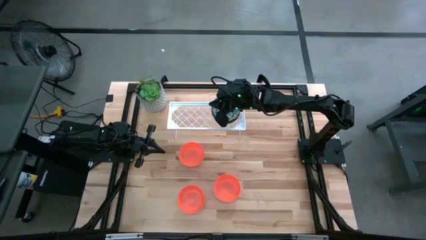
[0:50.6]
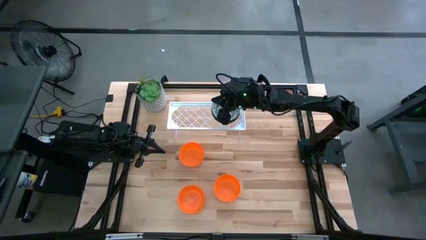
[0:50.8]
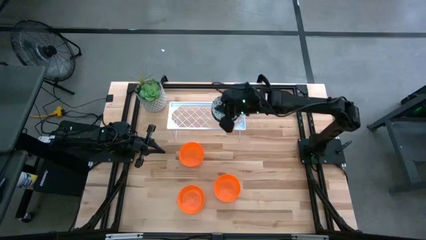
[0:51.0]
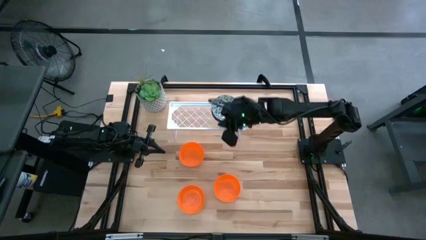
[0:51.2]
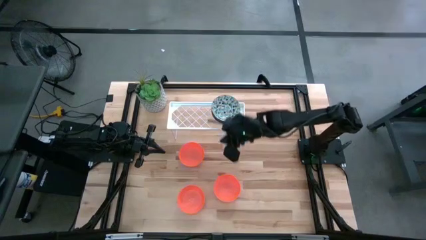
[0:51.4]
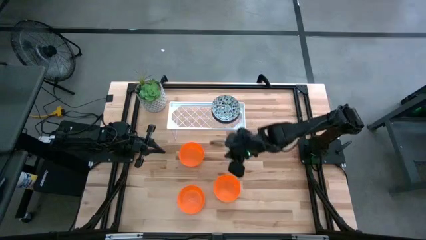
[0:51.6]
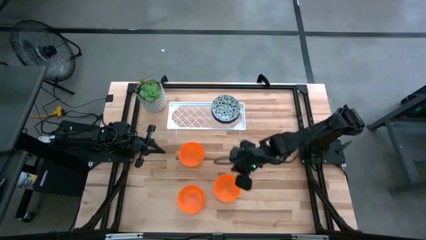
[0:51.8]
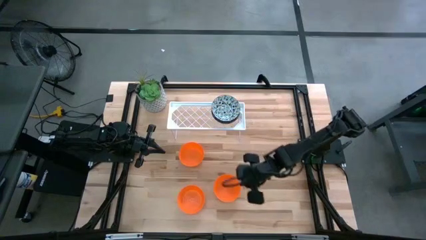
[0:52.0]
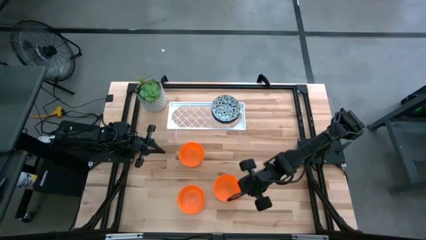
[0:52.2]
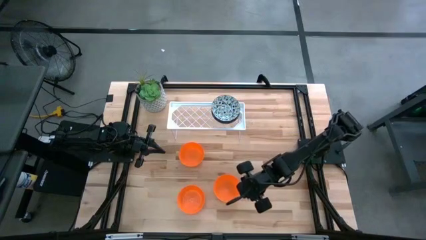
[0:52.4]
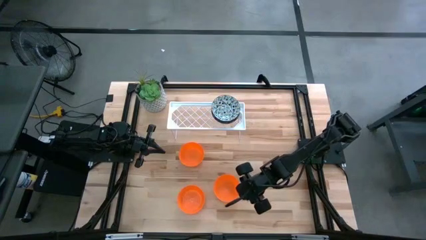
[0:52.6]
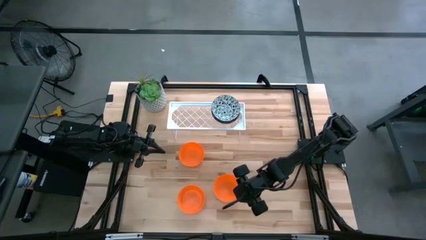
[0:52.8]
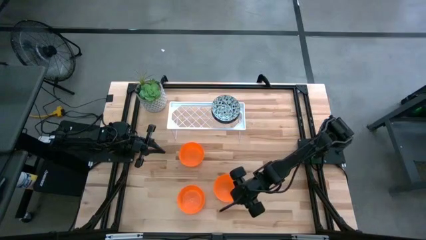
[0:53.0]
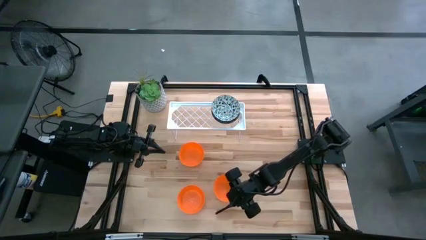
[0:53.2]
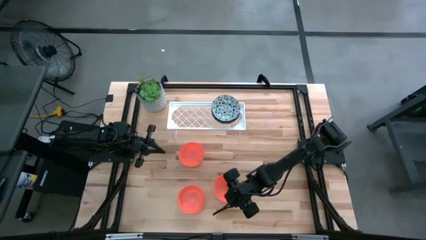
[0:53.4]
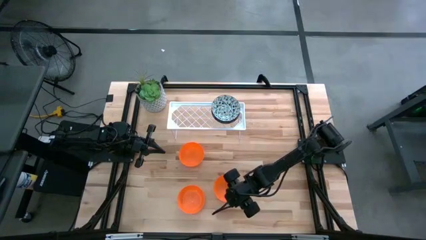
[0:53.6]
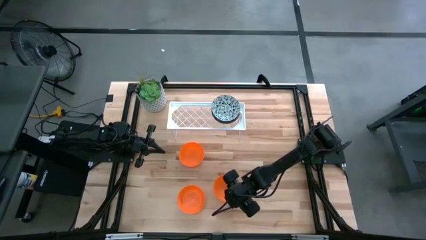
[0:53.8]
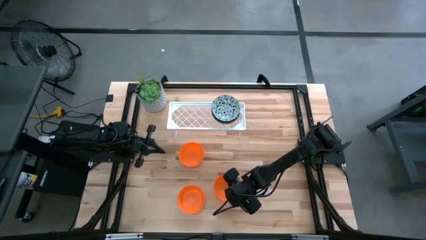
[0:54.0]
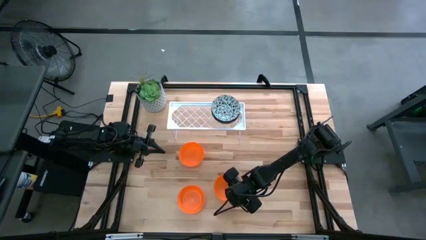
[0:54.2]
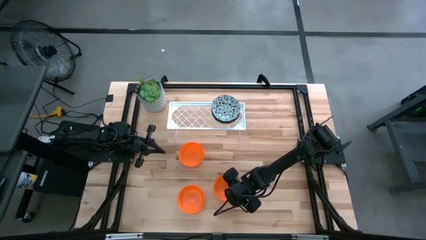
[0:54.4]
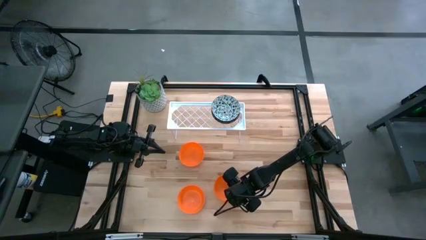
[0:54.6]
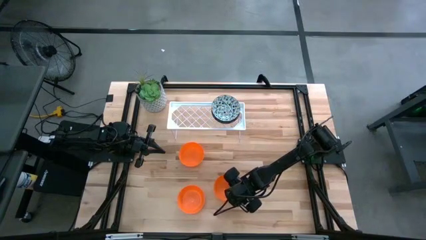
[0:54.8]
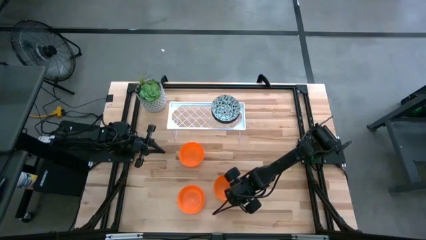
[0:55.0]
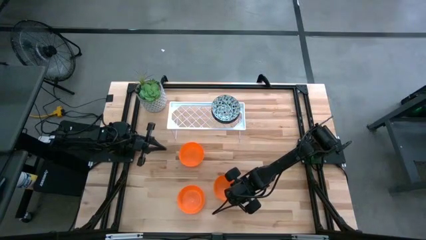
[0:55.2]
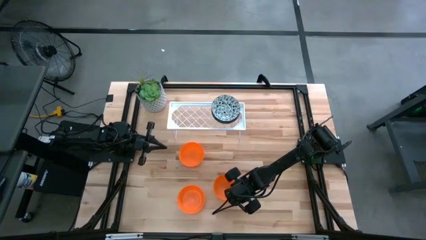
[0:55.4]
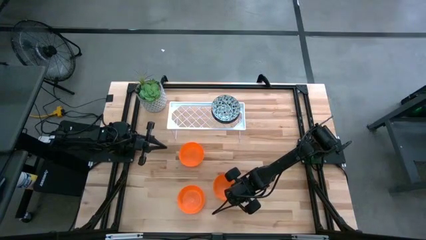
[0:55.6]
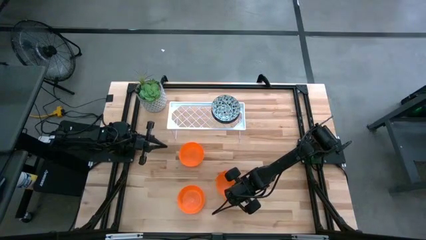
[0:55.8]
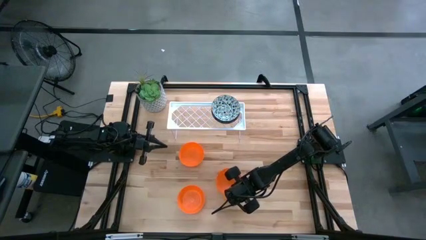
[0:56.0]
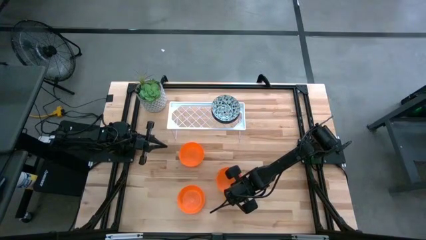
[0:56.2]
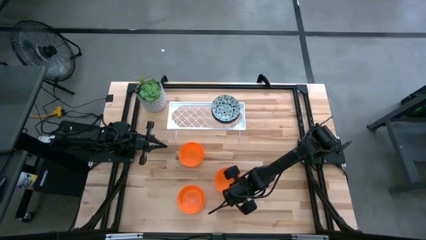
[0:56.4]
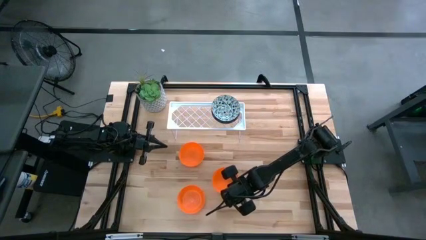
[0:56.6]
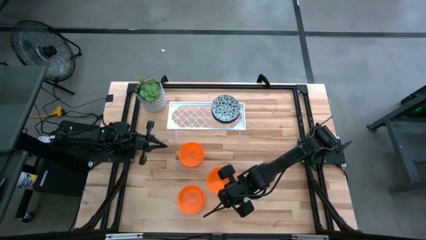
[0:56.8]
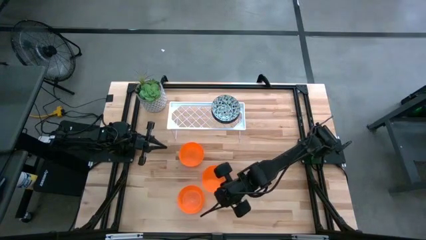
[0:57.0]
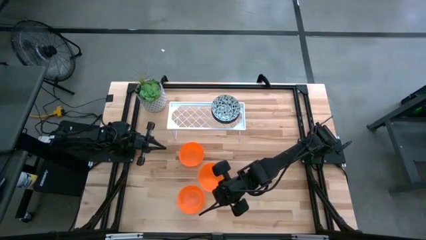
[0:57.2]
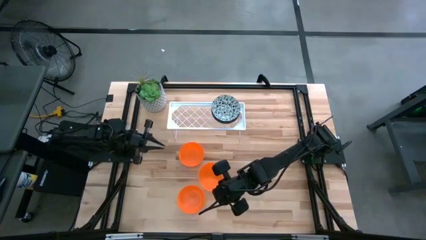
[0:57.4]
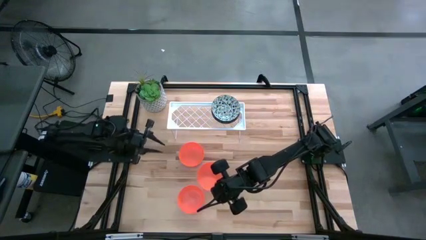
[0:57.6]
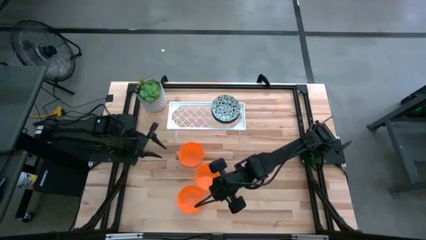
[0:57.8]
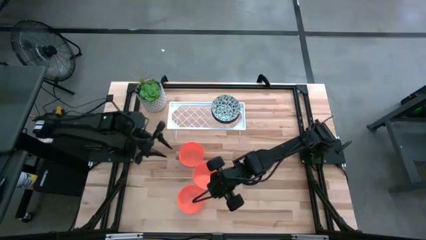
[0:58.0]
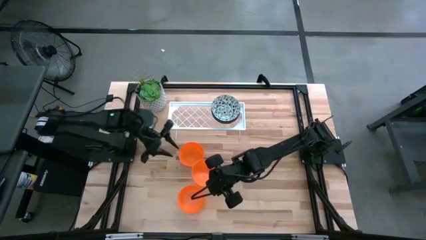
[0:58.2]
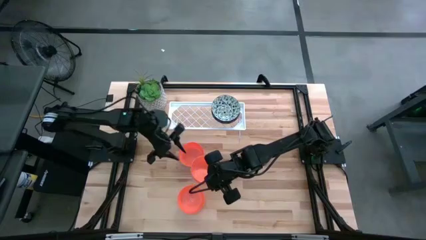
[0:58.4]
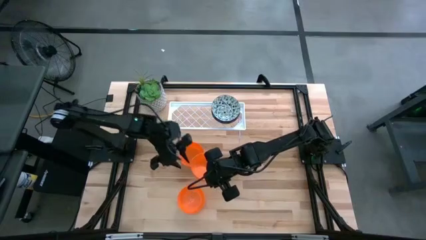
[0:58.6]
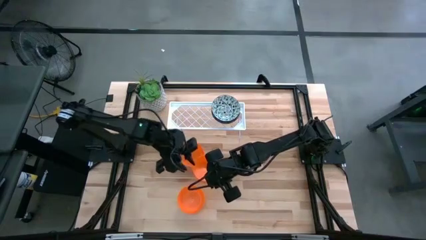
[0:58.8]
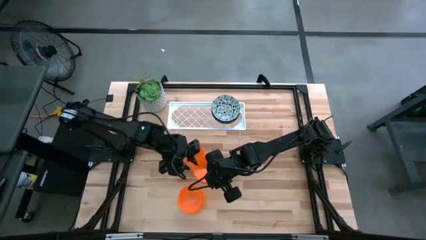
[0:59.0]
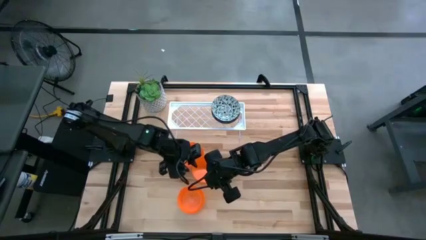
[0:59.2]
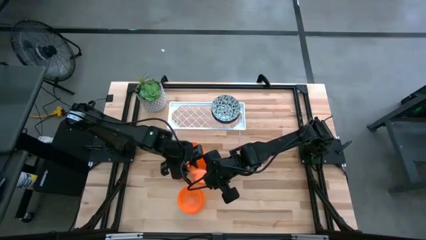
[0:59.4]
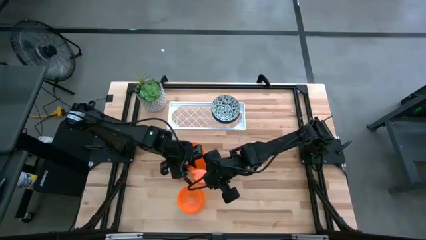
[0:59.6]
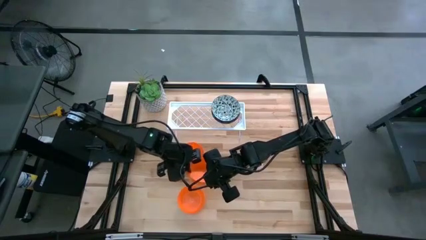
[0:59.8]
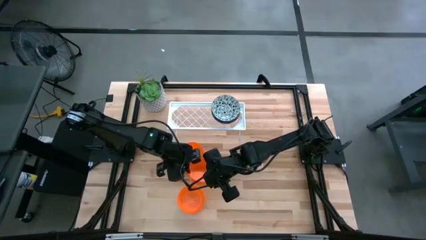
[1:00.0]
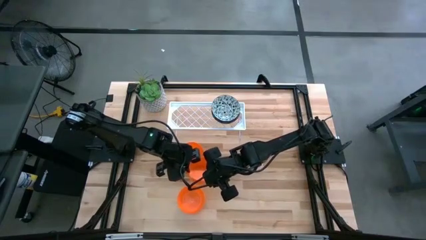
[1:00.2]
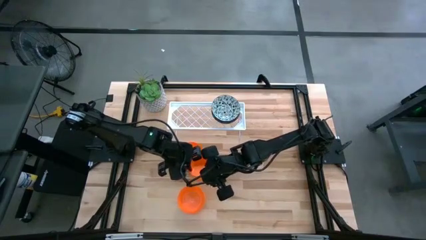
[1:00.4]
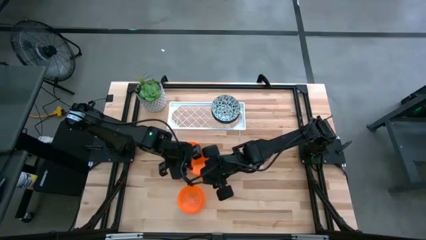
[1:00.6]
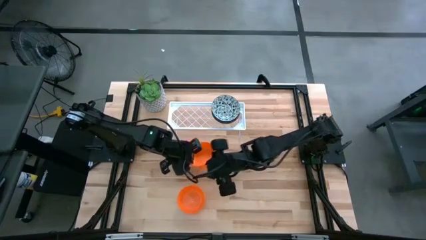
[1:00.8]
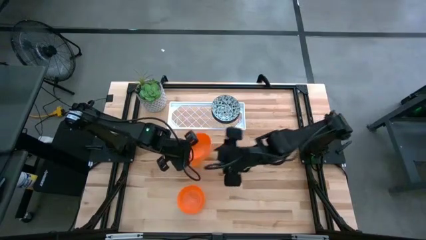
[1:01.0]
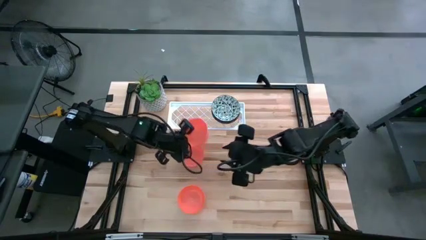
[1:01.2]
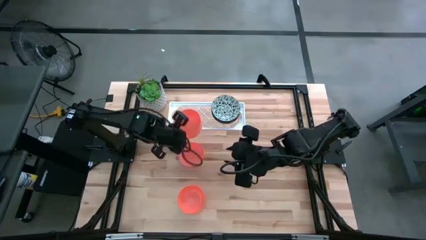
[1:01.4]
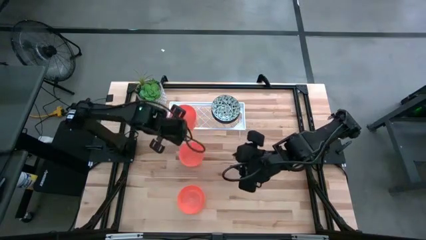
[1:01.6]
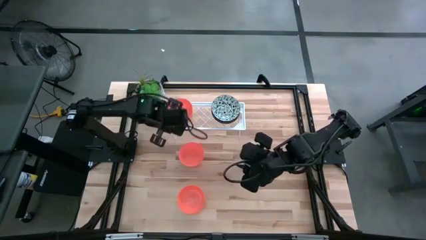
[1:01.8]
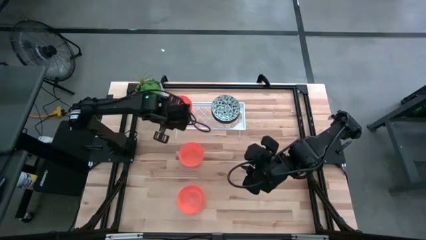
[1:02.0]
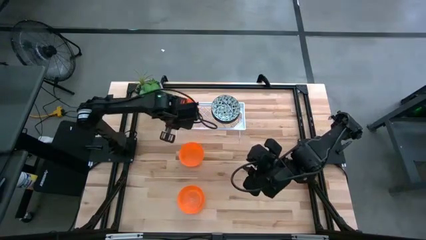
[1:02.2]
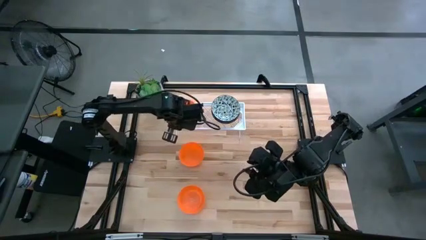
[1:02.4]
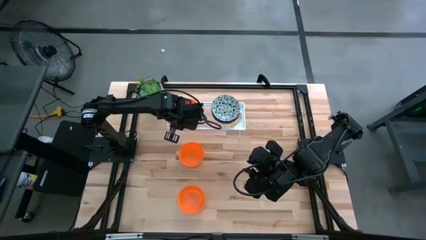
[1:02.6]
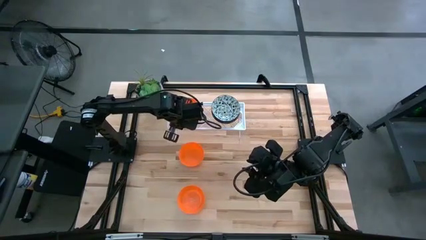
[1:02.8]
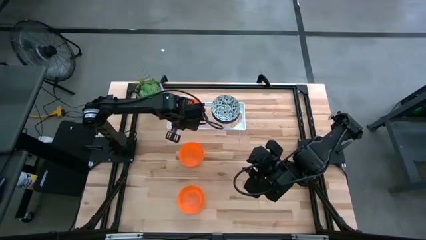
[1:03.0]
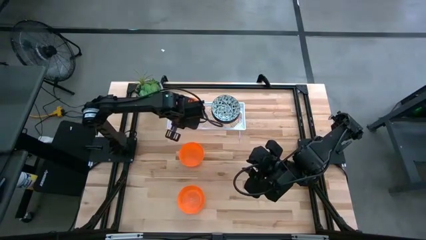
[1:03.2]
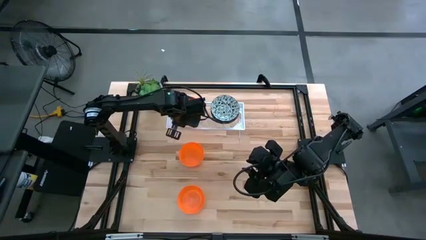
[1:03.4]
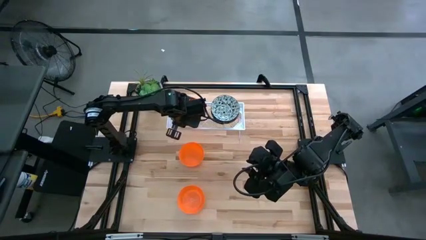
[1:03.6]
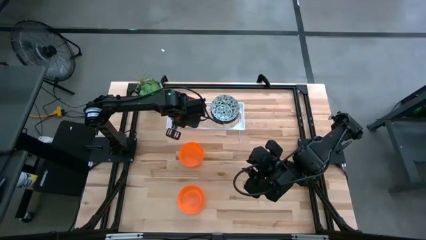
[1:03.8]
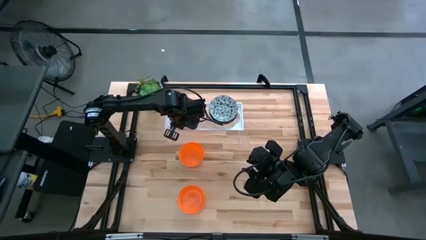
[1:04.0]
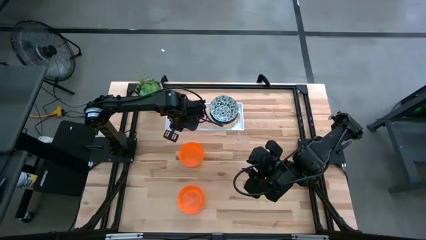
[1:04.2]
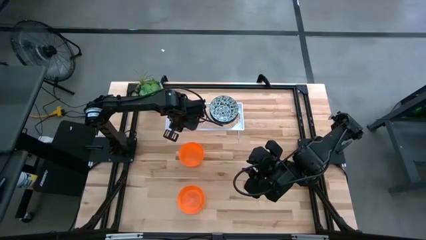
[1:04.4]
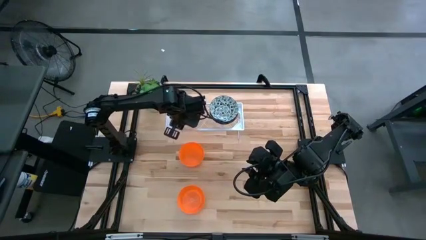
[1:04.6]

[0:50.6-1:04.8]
Task: Pick & Place Mini bowls
Put the bottom right orange bowl on the shelf

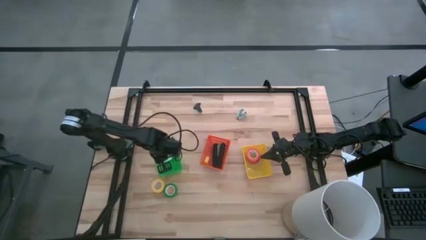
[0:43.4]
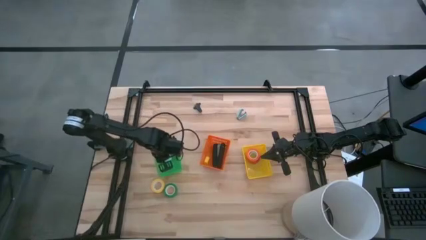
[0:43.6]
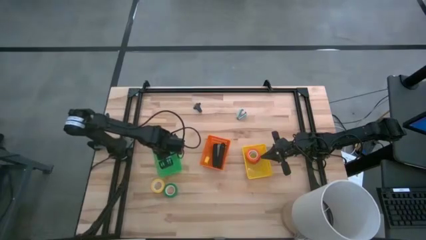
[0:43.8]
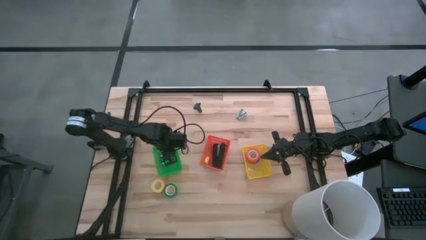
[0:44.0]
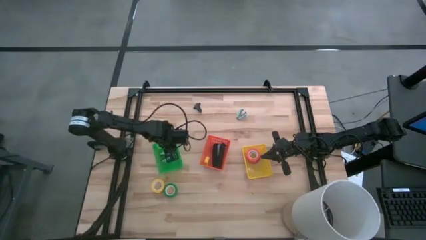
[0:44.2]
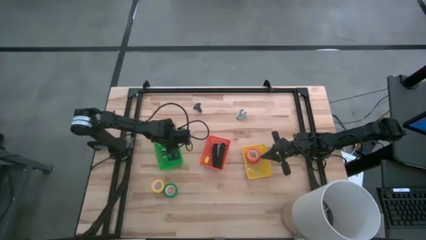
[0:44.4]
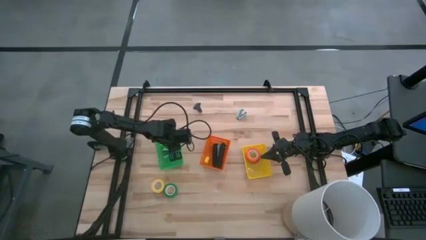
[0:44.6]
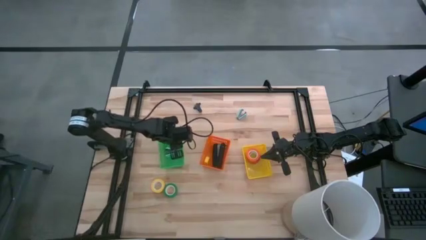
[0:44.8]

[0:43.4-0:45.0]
Task: Pick and place Stapler, Stapler remover, tape
Adjust the green bin

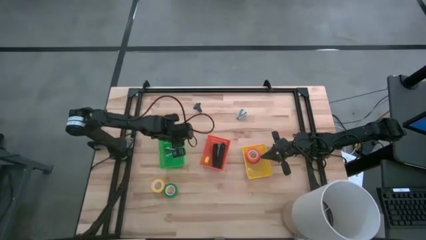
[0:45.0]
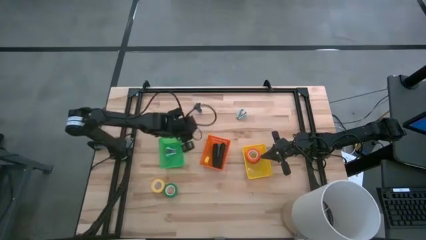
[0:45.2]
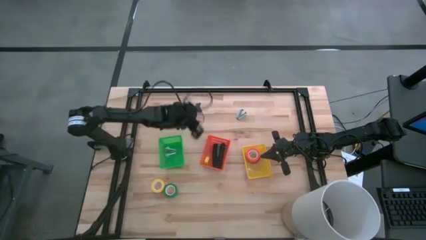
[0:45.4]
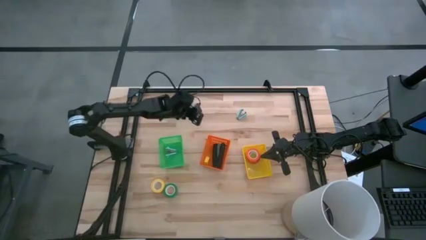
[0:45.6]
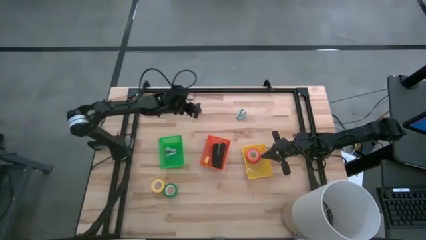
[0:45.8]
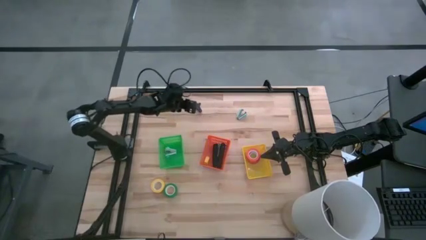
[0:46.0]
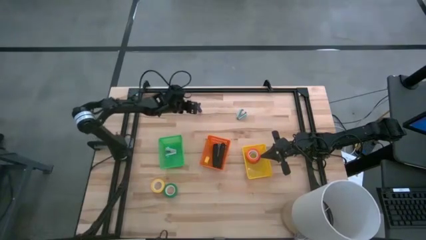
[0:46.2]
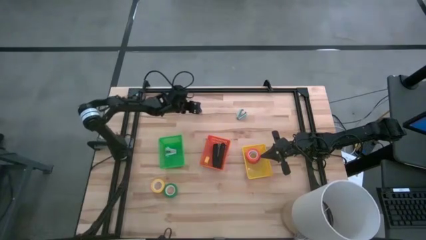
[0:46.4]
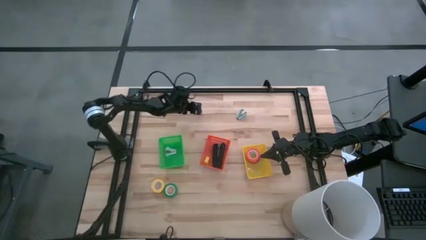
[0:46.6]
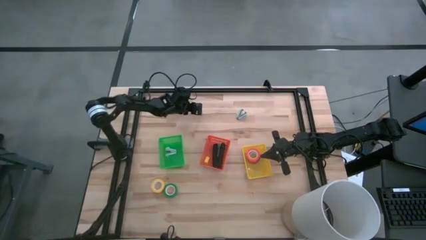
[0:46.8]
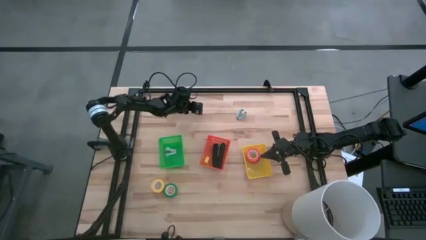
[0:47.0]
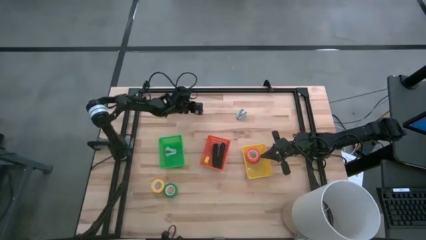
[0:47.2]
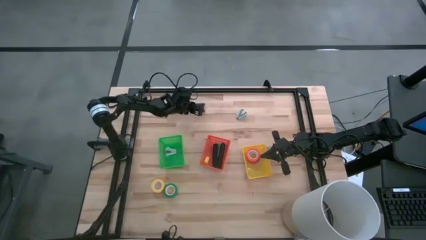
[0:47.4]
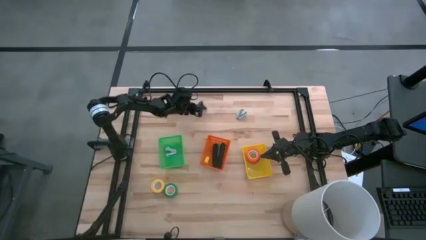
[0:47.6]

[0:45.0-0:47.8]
Put the black staple remover into the green bin
